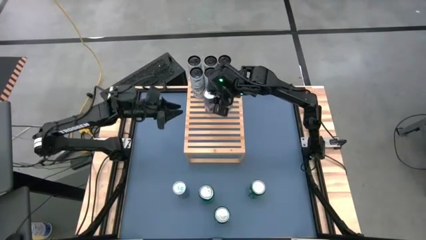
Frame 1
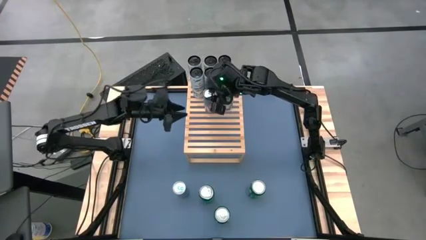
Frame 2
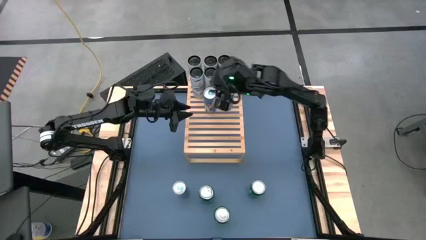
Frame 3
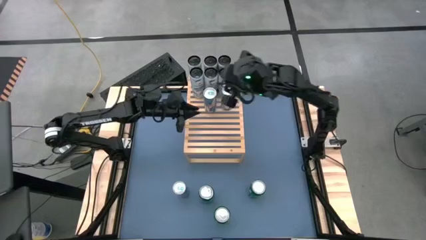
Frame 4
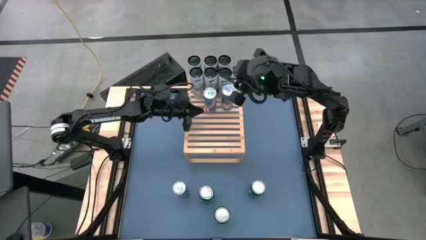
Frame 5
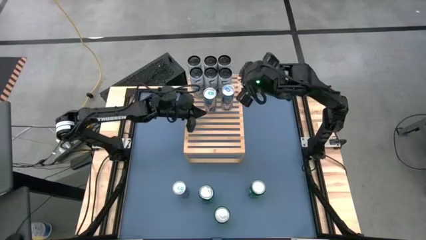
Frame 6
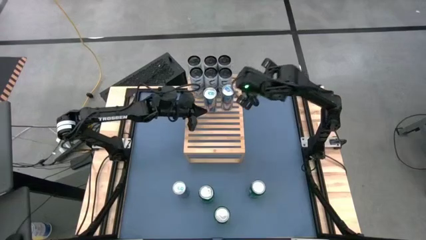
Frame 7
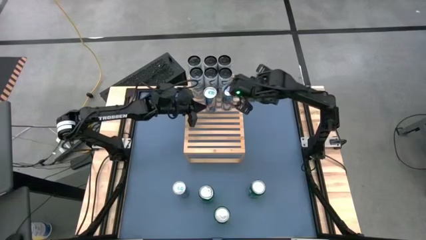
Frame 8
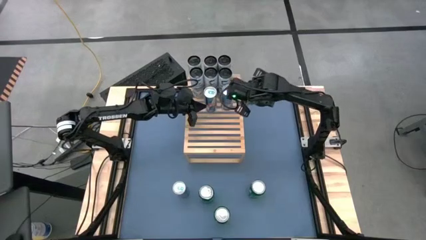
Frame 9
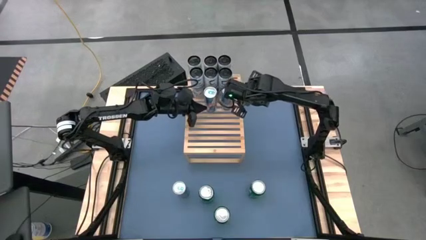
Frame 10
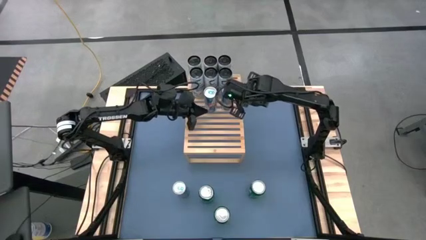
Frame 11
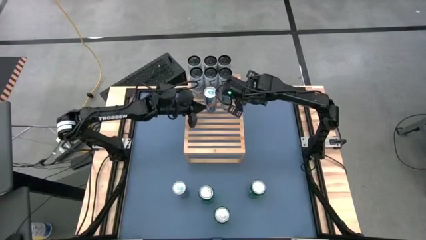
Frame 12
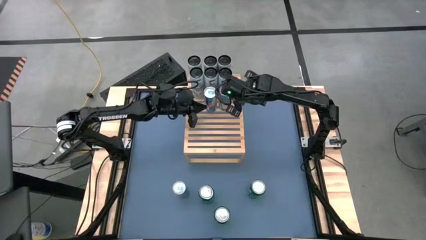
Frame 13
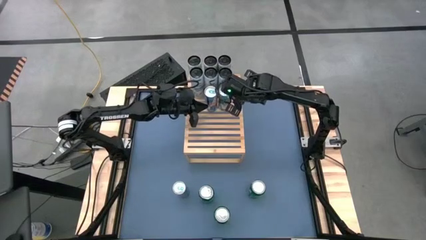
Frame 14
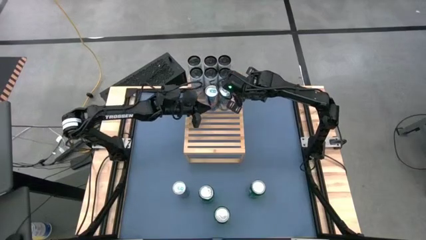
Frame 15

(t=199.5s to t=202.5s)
Task: Place canned beverage on shelf
Adjust the blue soda cans and on the shelf aligned the blue soda cans

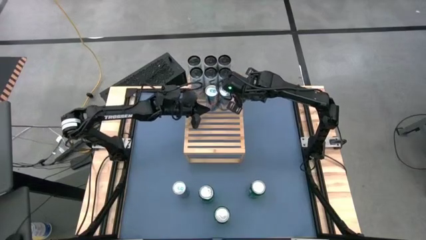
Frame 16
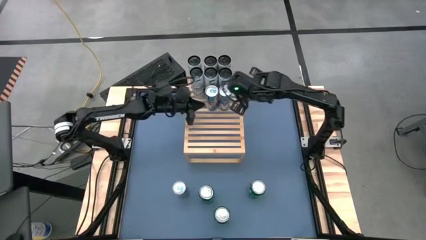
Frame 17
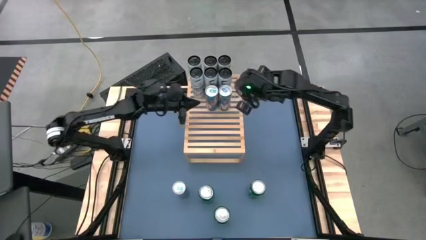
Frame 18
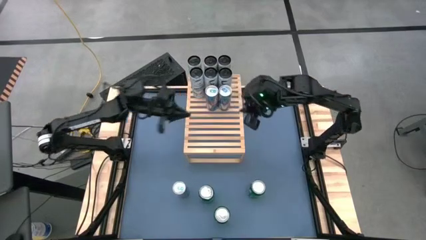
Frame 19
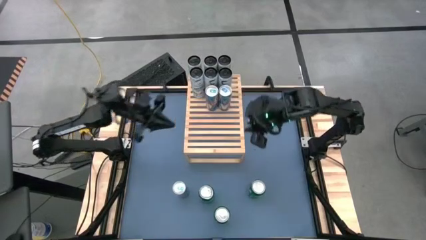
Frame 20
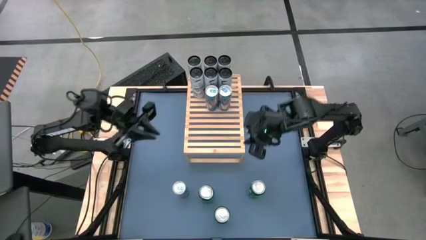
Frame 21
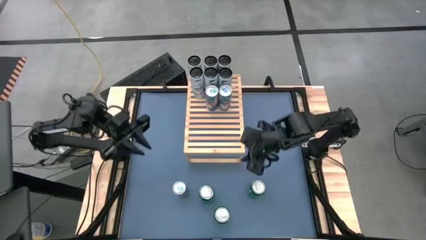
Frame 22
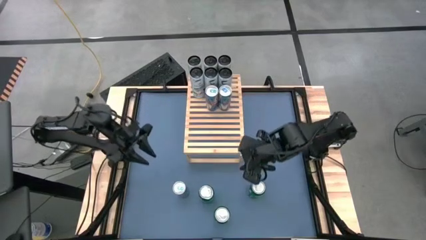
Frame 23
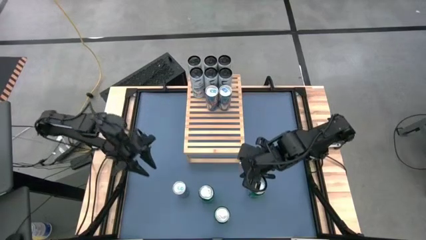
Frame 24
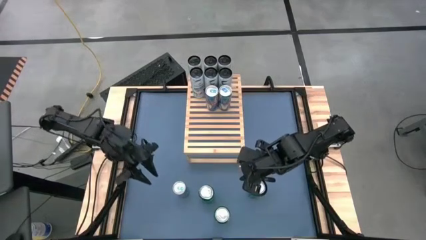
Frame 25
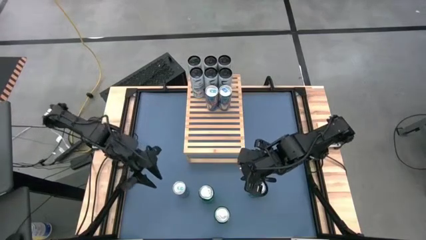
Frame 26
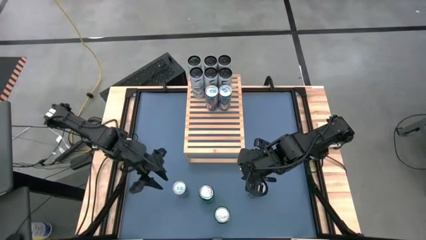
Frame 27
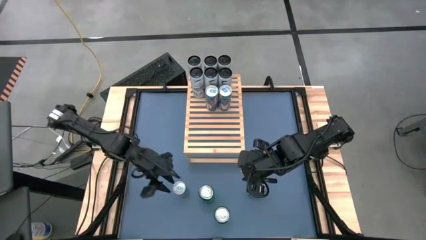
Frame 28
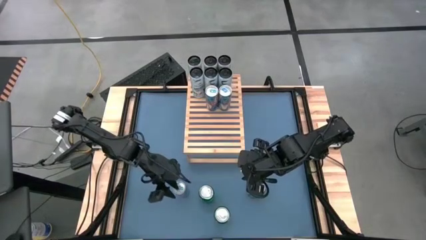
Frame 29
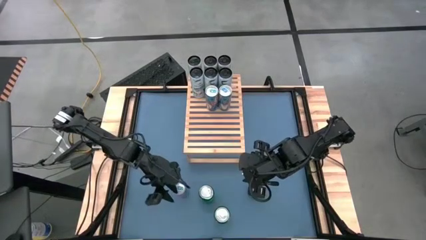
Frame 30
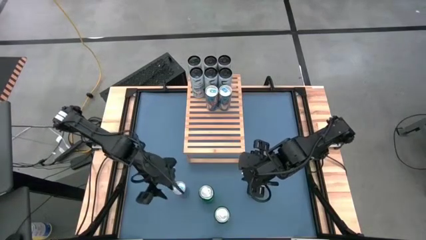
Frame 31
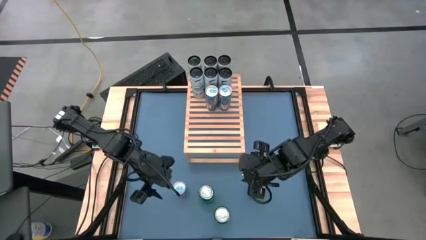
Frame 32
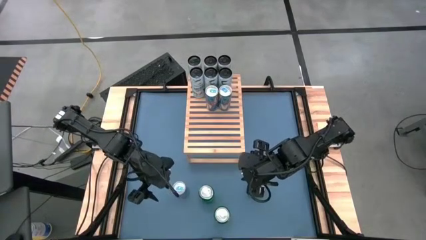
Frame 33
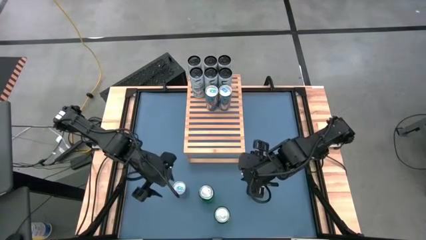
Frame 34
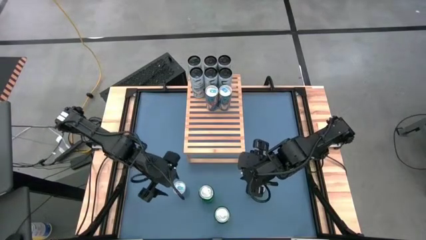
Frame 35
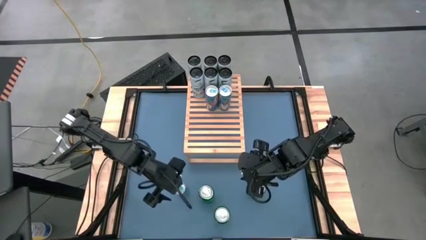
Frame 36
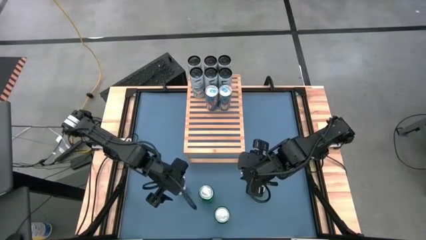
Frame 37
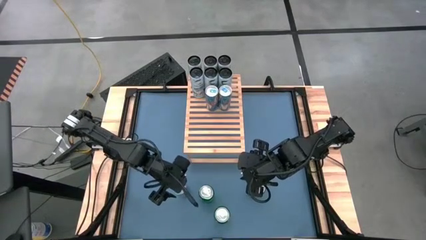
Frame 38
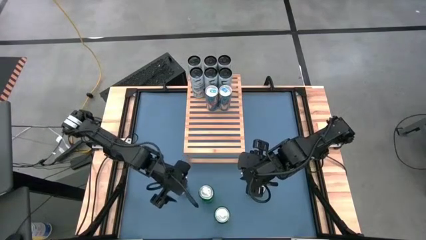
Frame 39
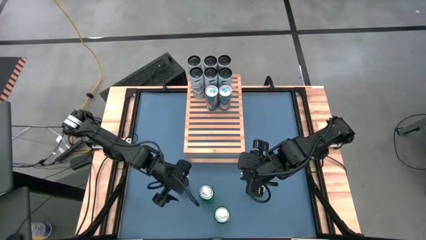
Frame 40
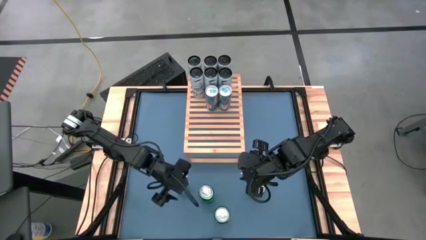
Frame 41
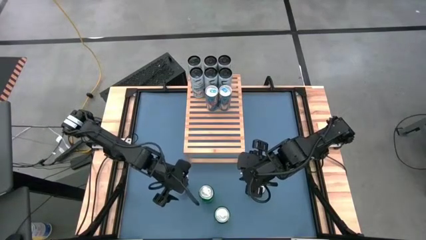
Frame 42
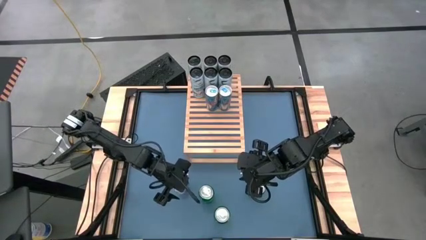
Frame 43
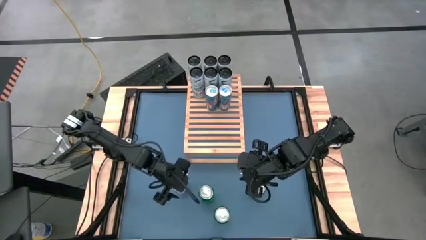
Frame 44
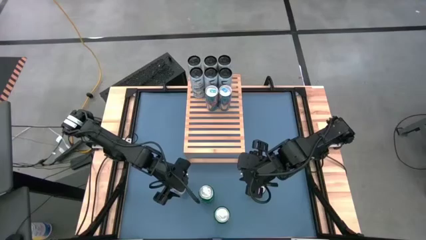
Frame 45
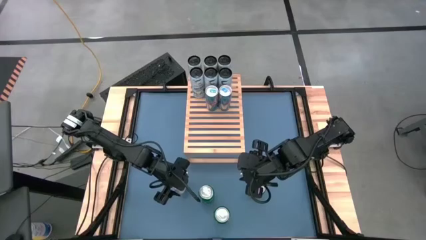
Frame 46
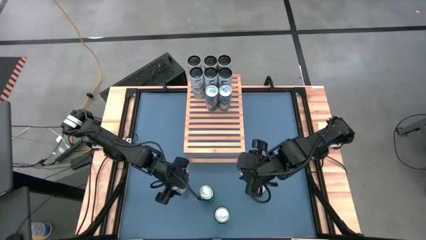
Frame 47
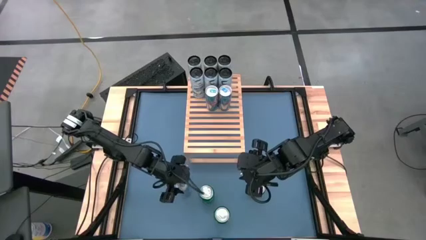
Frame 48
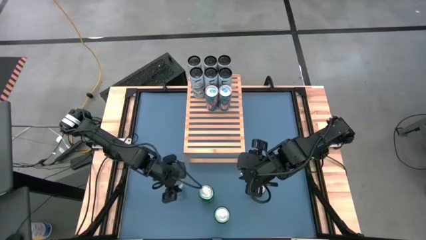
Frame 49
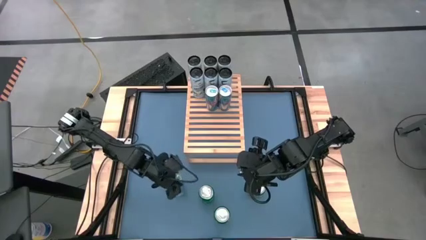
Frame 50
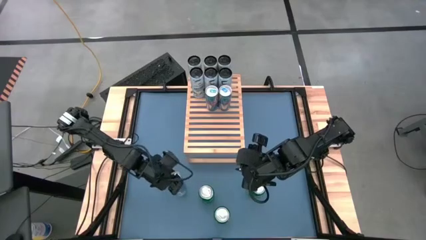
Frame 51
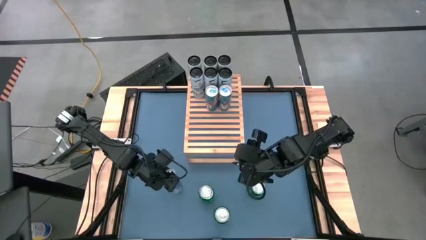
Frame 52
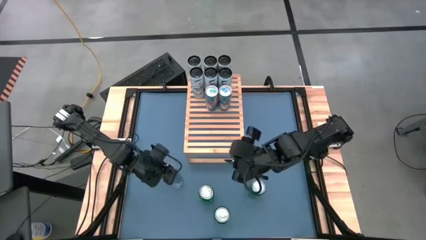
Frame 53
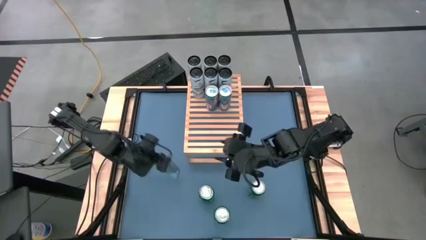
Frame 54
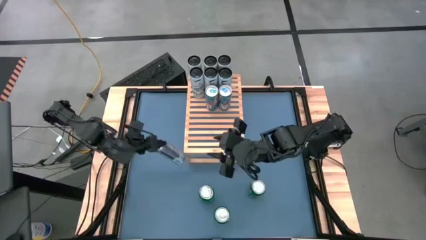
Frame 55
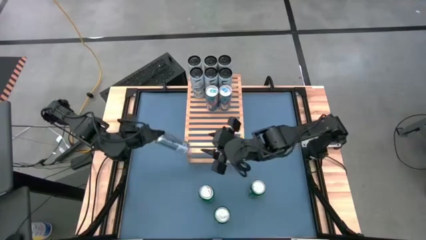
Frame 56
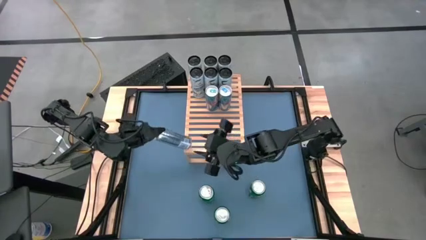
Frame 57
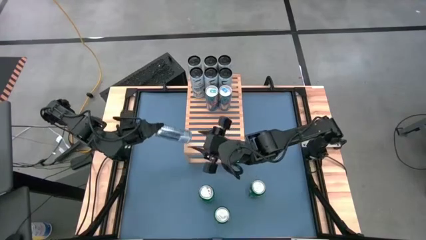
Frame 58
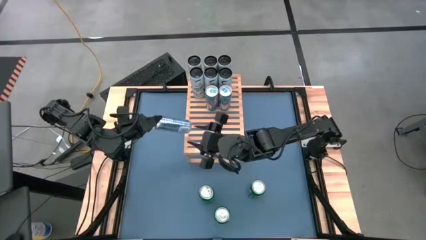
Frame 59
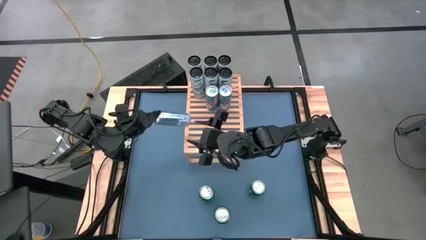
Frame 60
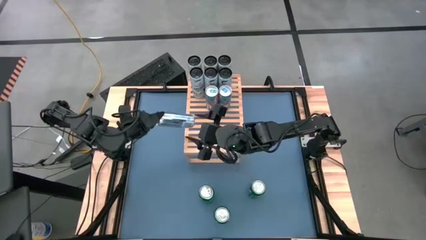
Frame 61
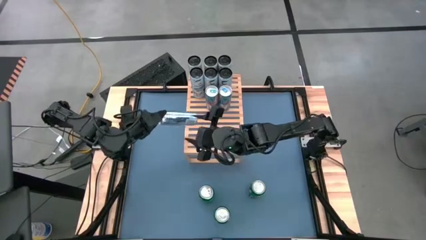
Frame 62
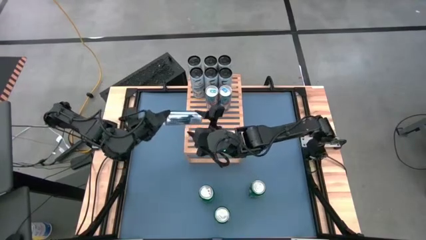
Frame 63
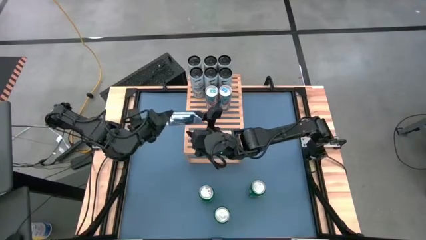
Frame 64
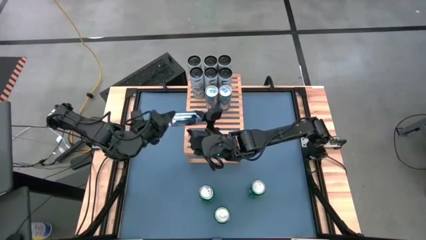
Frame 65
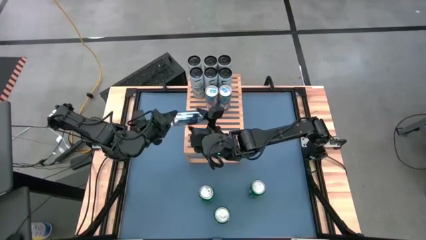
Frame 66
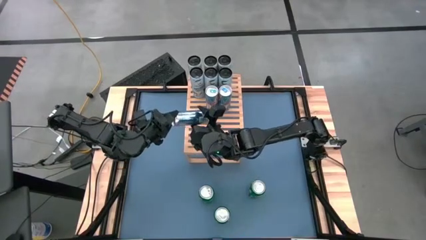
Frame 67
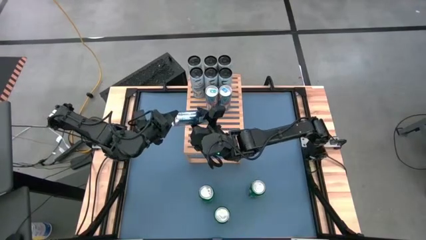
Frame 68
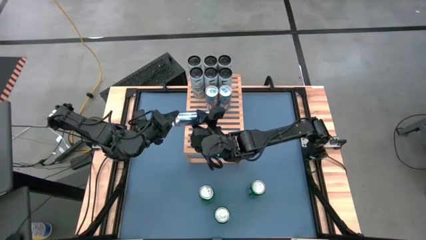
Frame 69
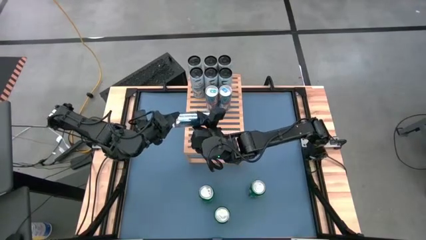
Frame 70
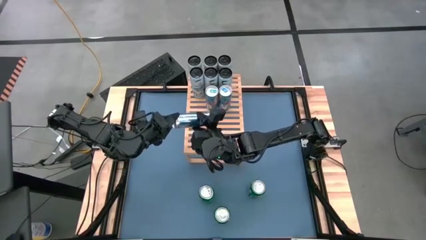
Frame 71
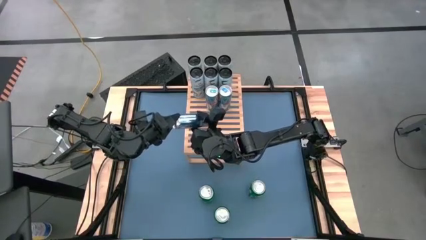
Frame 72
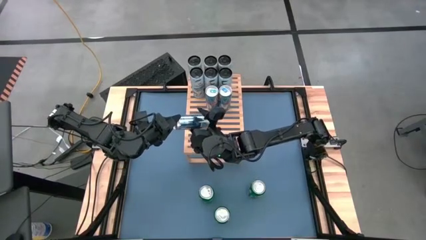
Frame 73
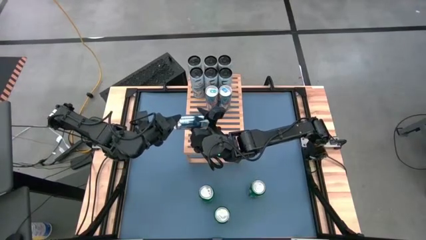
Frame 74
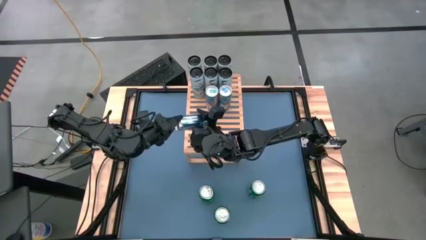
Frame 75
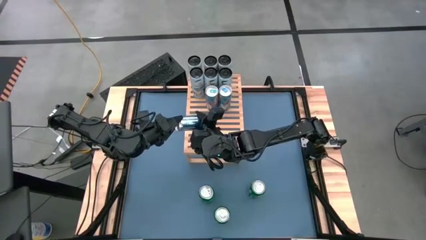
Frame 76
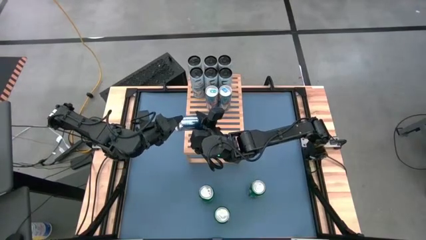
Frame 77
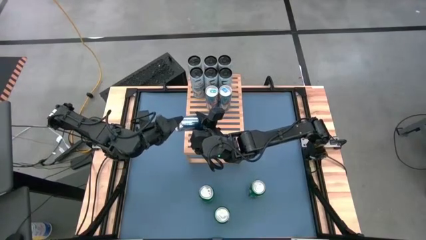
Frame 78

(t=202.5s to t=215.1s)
Put the blue soda can on the shelf aligned to the other blue soda can
